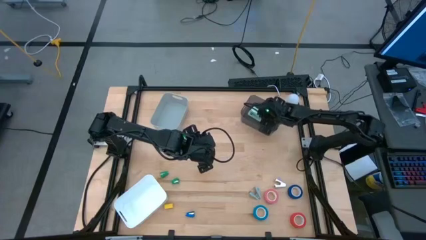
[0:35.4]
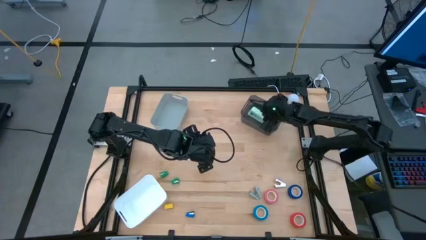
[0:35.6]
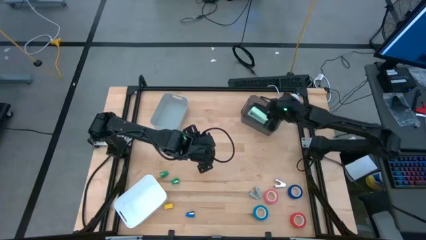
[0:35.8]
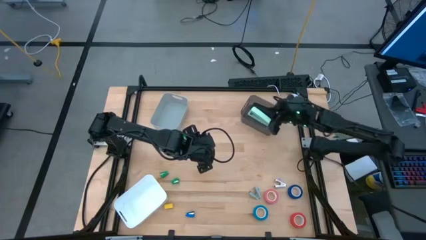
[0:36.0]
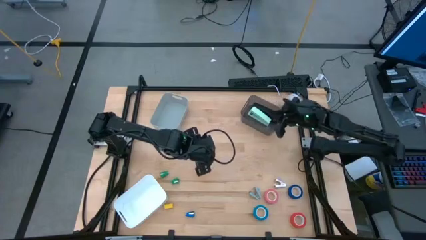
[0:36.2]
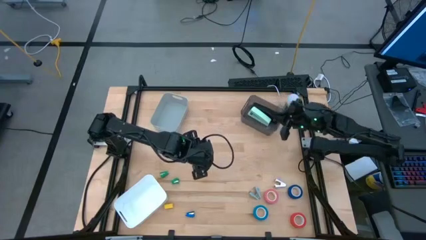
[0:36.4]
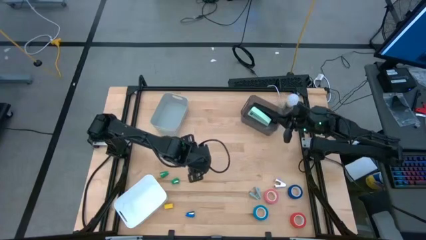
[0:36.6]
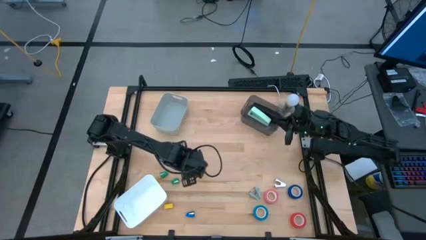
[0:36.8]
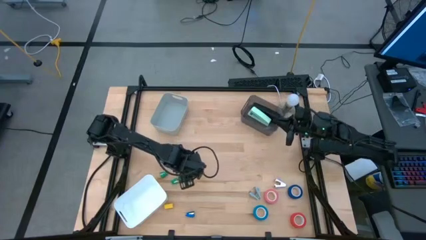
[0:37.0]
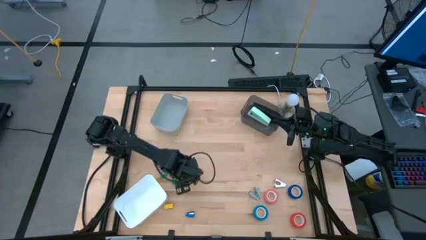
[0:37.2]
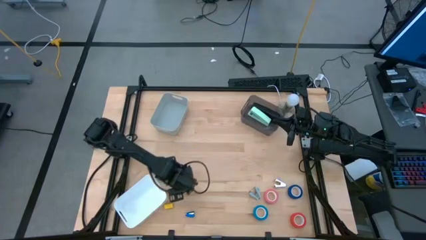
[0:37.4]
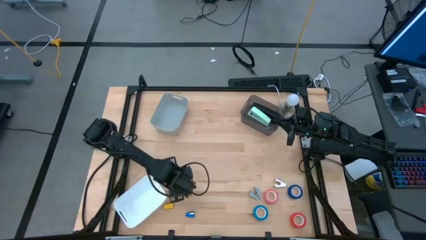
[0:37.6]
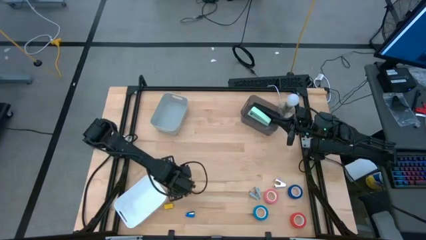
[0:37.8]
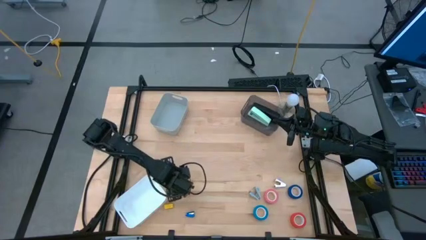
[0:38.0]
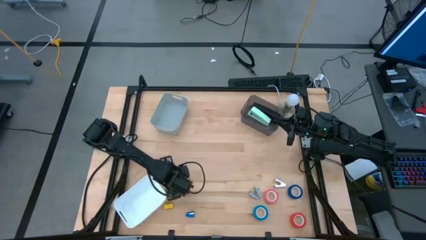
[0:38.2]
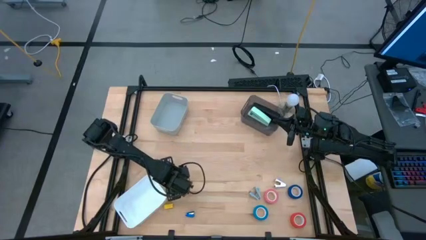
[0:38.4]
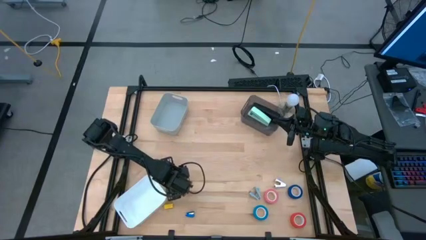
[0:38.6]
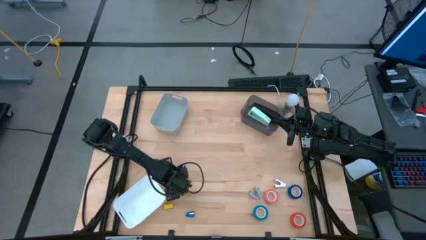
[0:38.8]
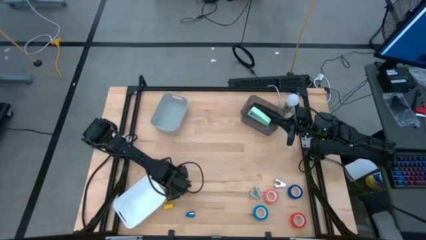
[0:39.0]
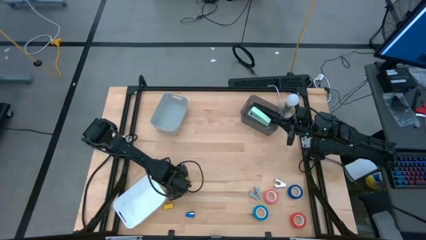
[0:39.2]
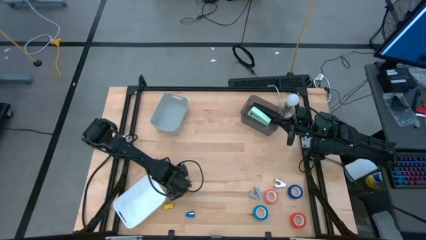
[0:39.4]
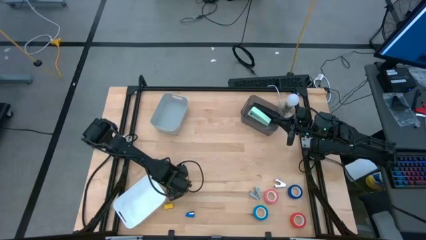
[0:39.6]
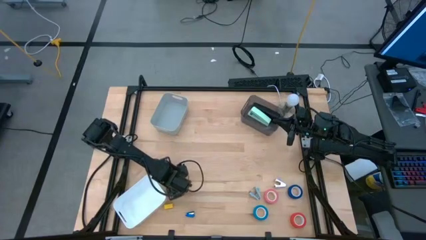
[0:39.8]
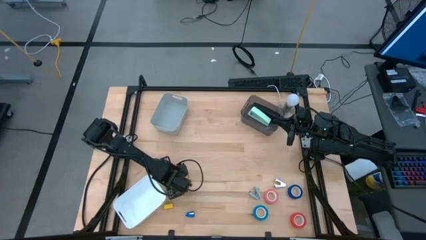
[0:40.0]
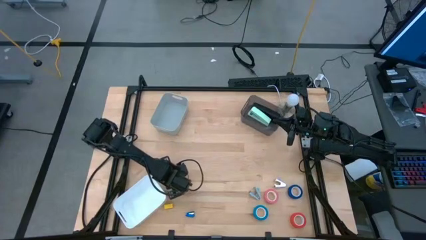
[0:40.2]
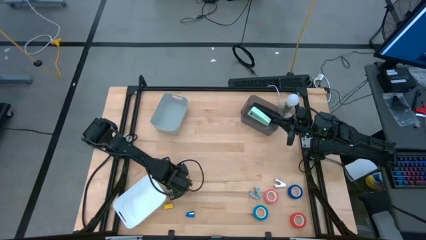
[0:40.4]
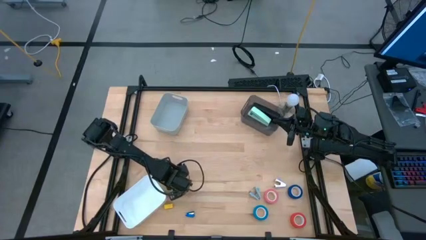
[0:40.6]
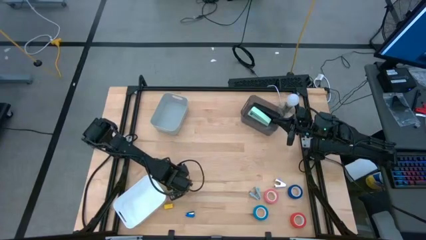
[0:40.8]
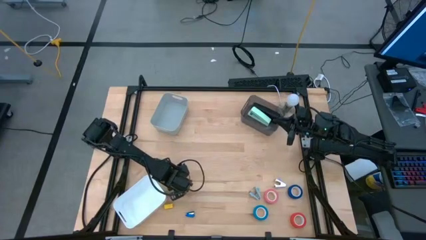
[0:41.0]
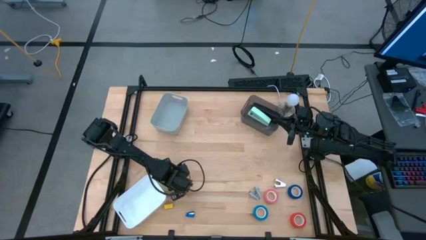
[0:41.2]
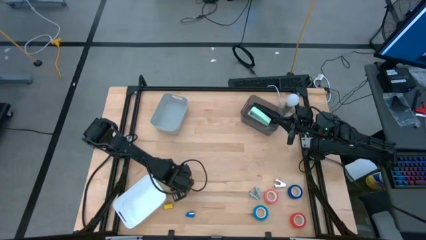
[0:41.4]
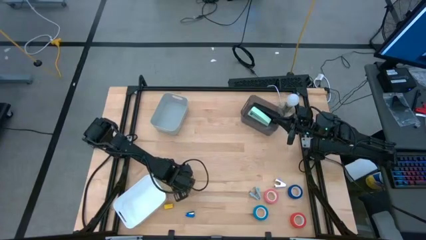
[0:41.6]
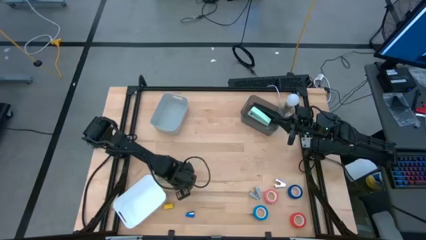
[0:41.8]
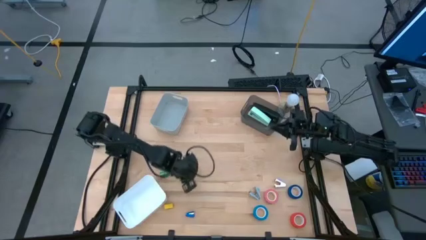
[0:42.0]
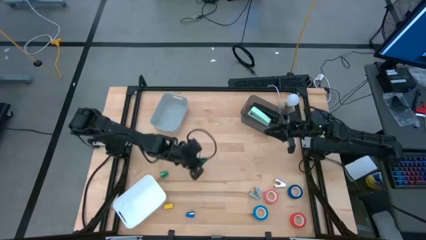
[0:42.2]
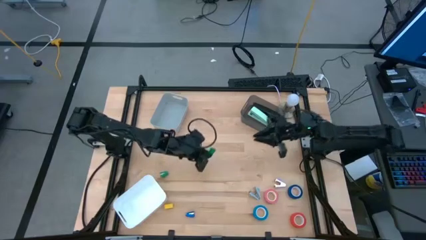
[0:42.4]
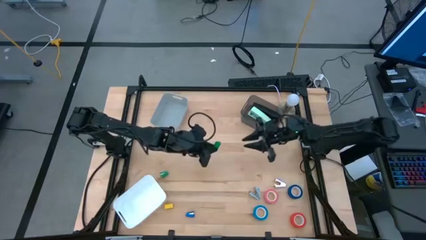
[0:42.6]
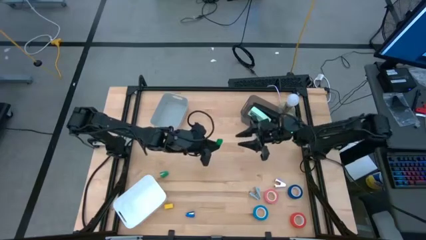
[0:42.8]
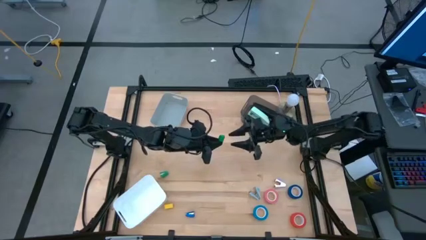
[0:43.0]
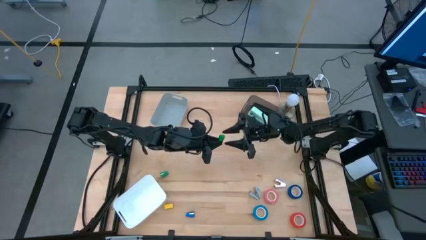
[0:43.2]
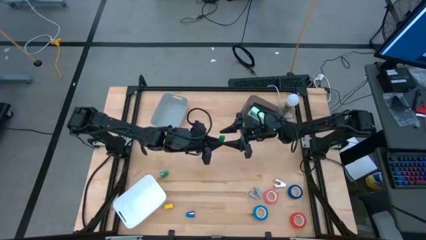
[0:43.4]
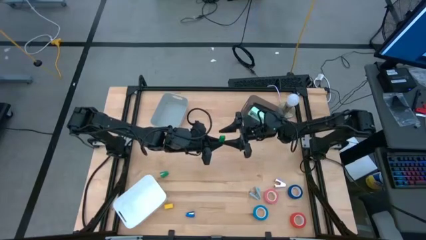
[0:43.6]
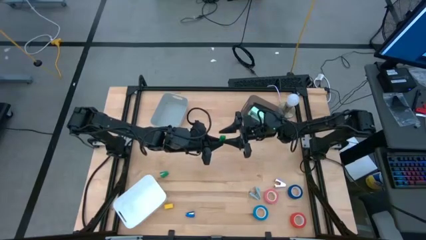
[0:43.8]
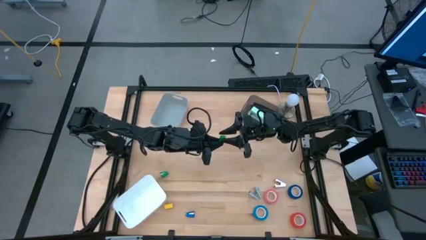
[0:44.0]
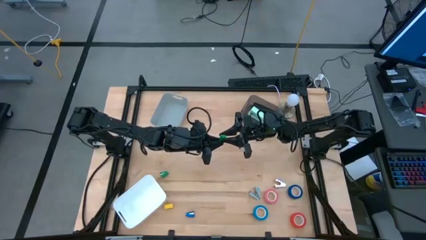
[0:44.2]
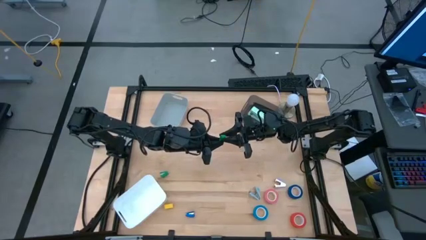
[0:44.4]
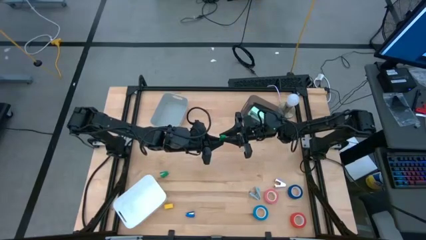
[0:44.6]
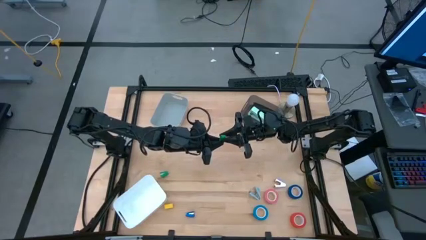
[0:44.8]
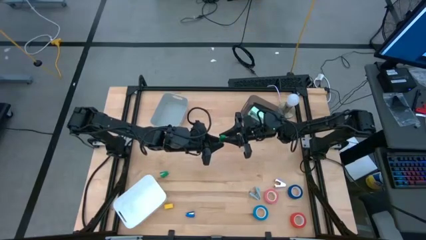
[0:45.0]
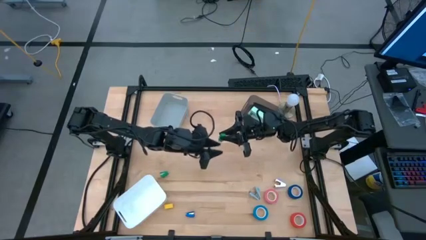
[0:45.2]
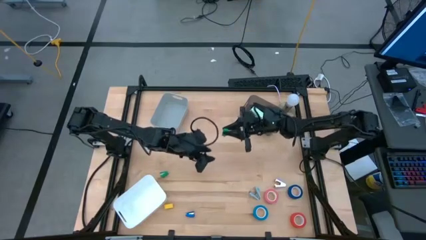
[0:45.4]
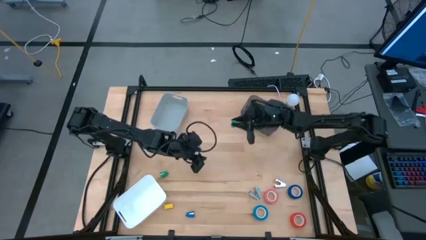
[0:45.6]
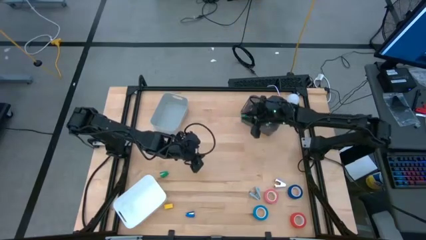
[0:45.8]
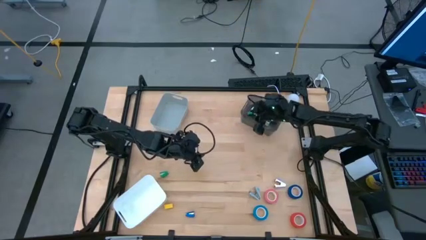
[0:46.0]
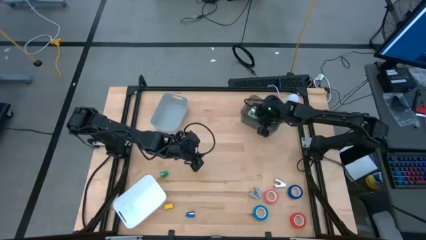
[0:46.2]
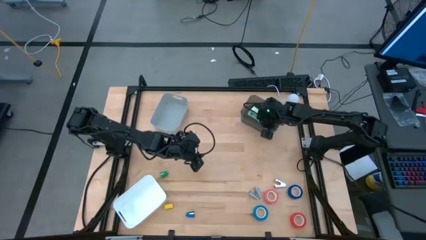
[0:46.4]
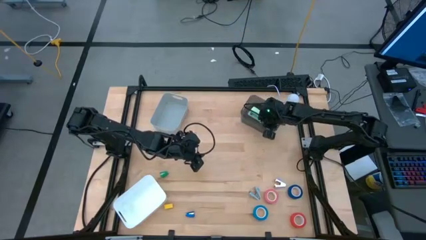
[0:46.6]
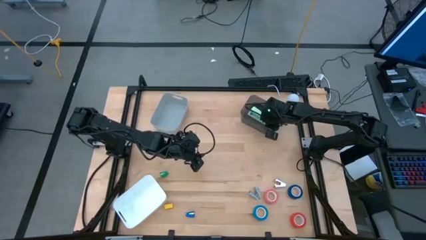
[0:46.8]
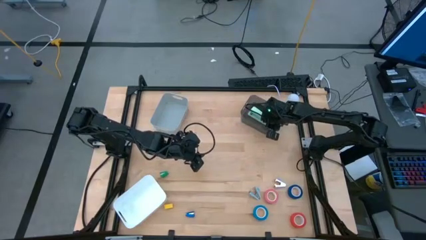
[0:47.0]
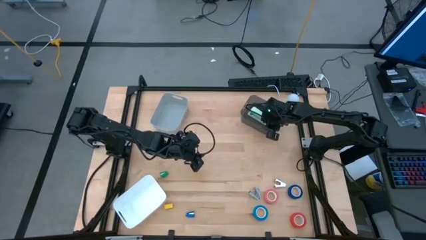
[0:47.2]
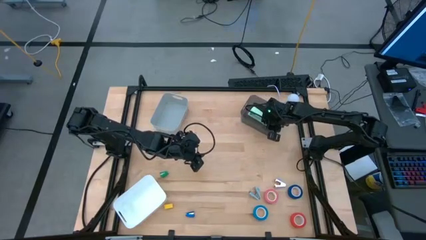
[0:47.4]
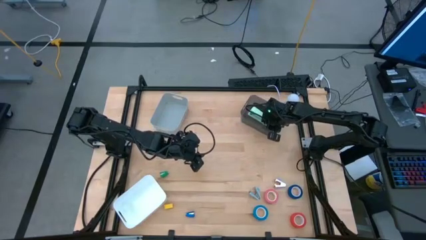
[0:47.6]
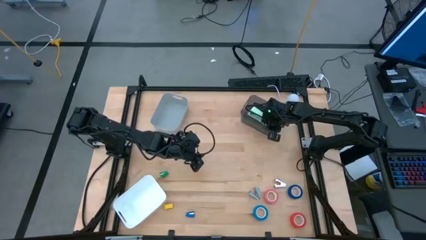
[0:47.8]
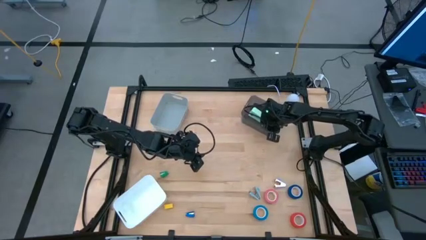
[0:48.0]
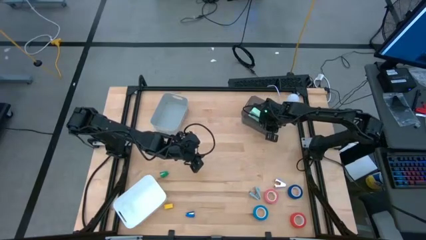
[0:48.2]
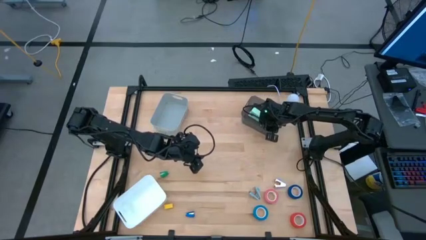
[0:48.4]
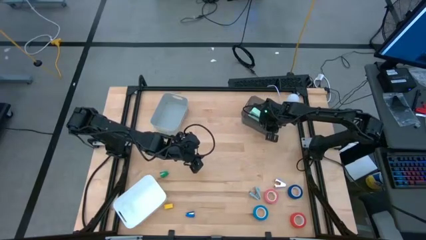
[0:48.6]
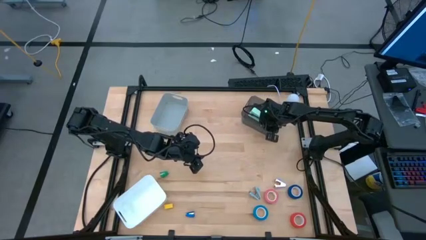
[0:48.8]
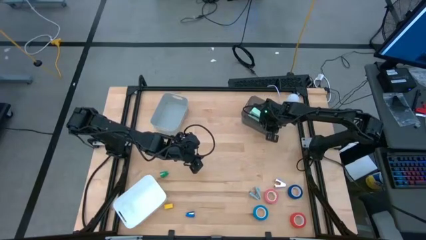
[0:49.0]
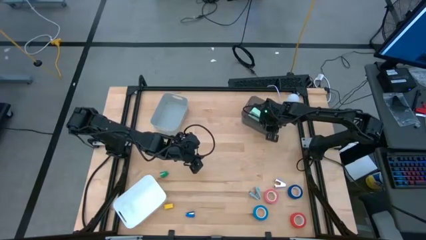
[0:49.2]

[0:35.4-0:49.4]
Task: Pick and place Stapler, Stapler remover, tape
Put the bottom dark green stapler into the black bin

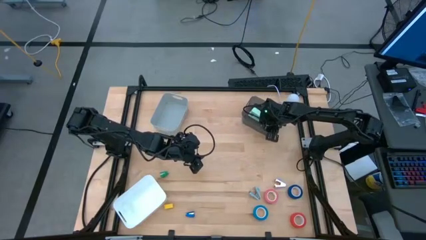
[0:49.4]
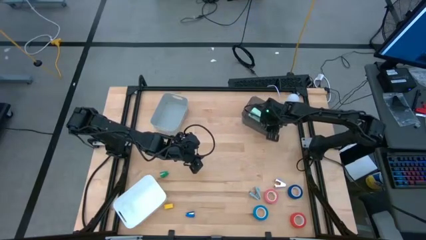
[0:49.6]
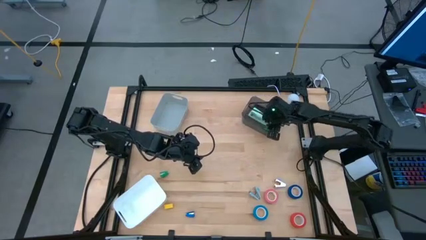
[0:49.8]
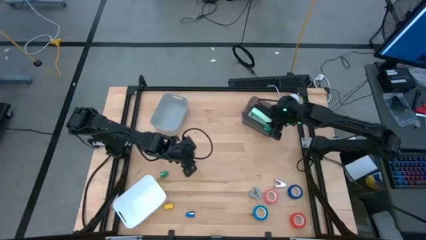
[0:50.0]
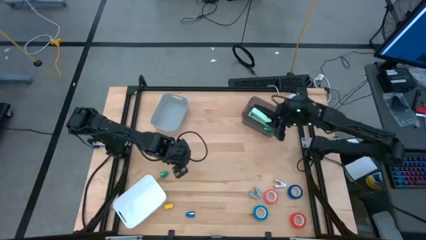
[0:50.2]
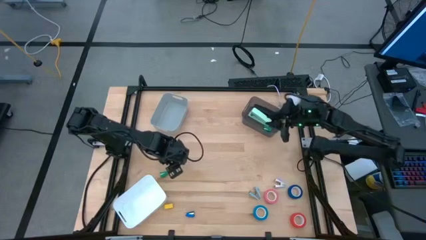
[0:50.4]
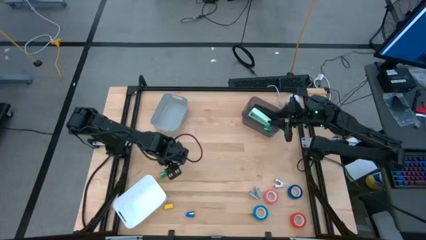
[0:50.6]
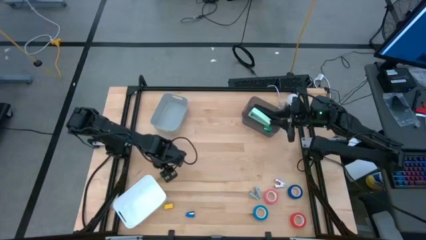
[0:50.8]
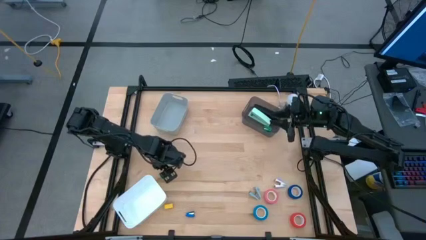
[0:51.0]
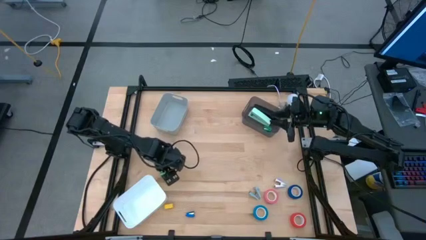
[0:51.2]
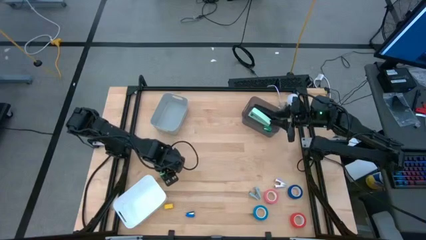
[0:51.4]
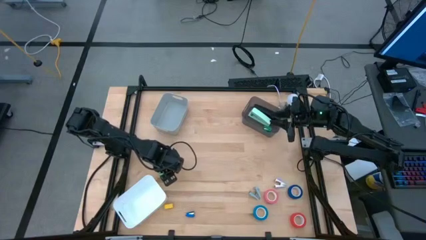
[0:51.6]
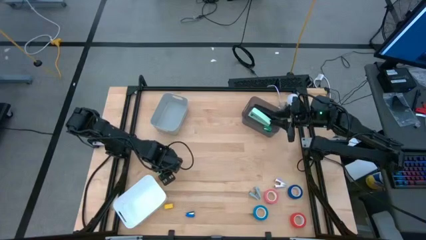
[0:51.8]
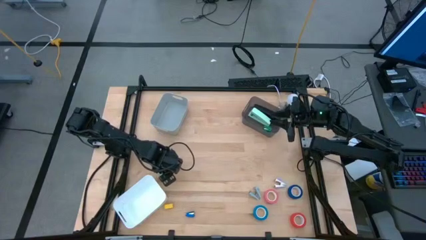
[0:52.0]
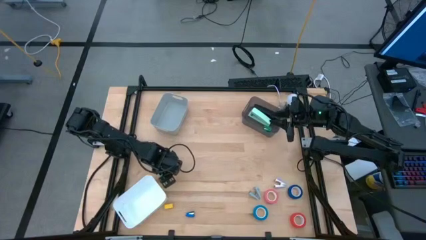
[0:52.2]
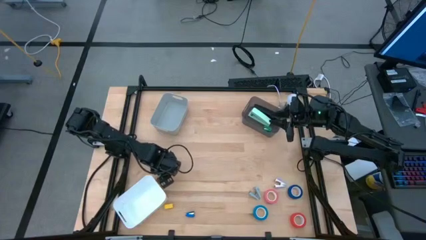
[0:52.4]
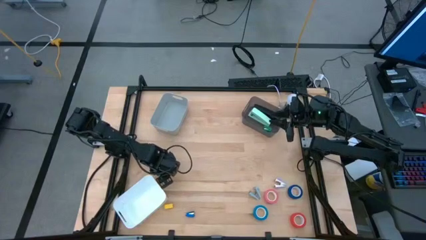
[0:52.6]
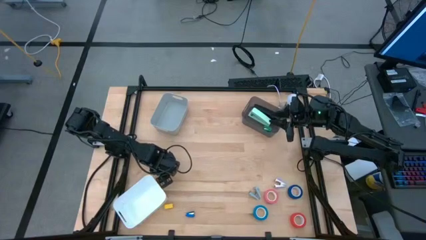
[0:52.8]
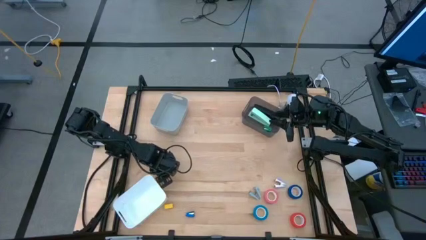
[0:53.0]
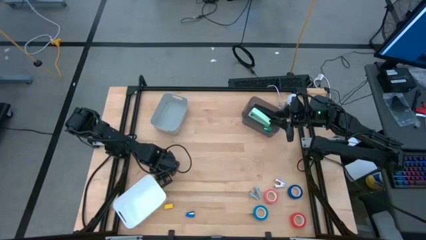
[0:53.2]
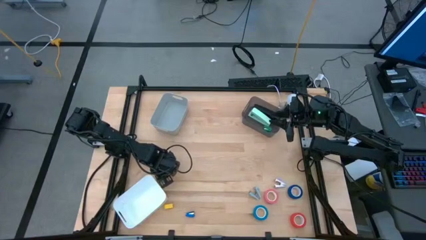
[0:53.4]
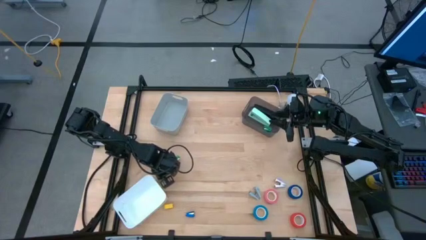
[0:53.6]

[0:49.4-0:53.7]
Put the dark green stapler into the black bin
